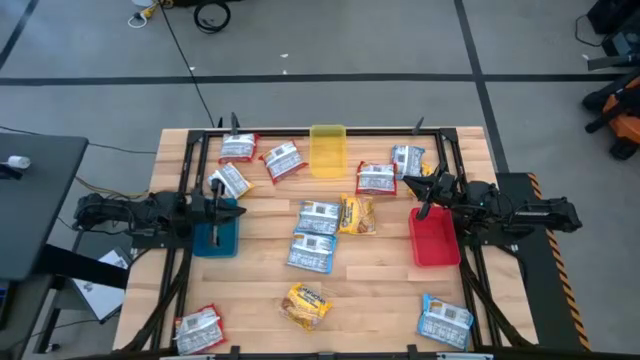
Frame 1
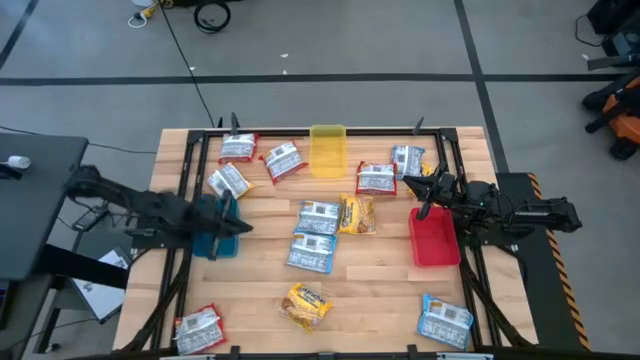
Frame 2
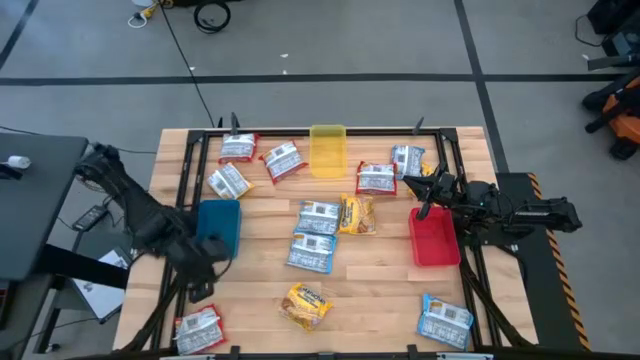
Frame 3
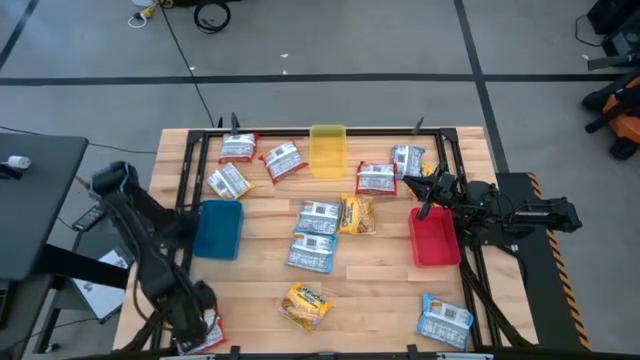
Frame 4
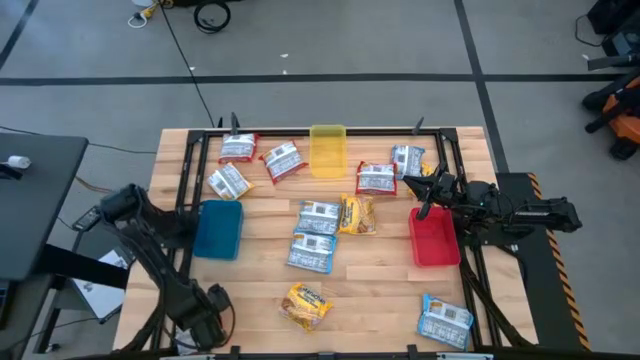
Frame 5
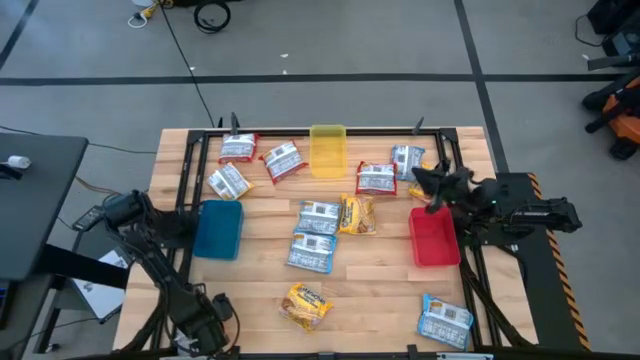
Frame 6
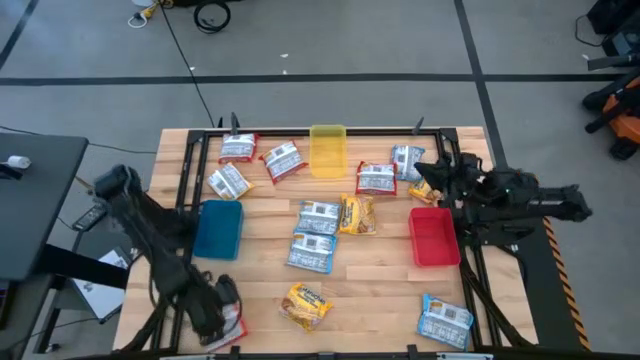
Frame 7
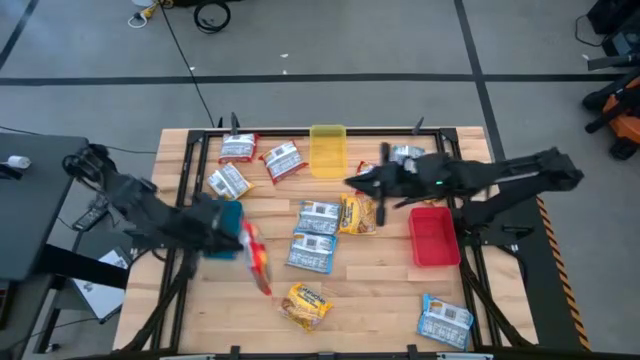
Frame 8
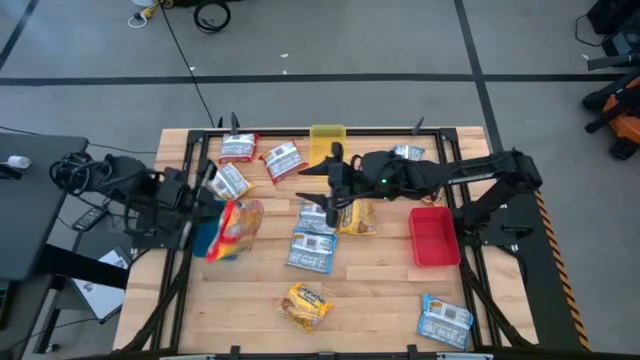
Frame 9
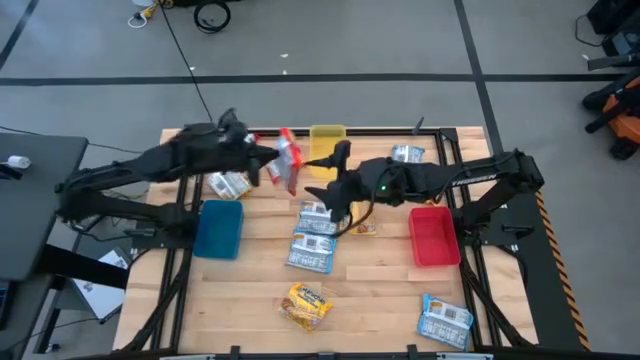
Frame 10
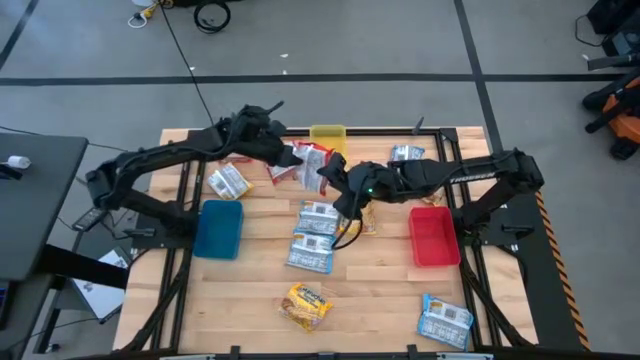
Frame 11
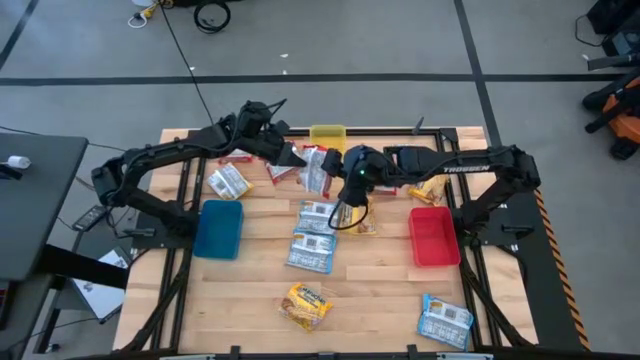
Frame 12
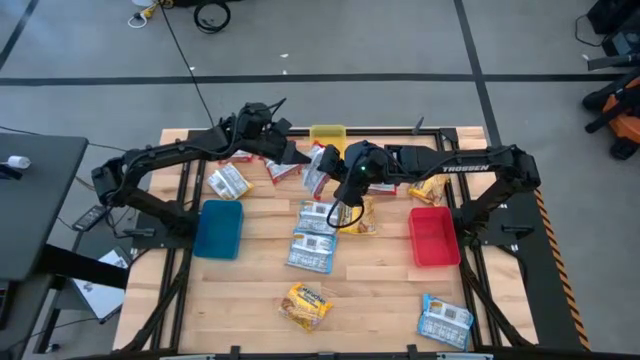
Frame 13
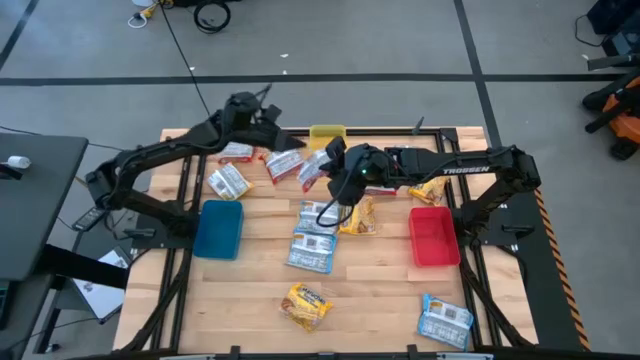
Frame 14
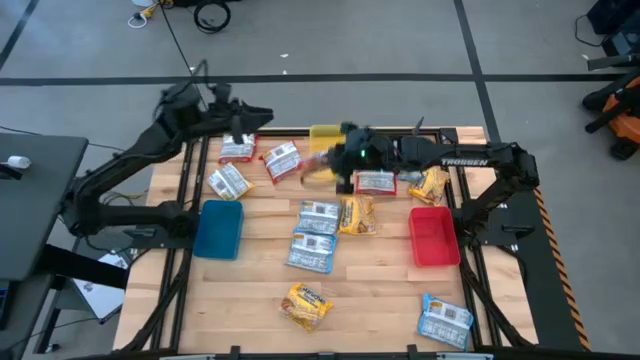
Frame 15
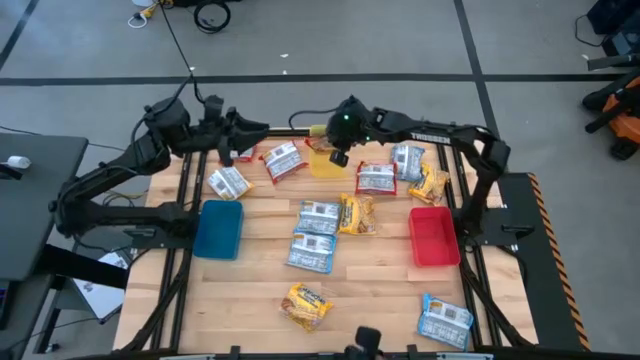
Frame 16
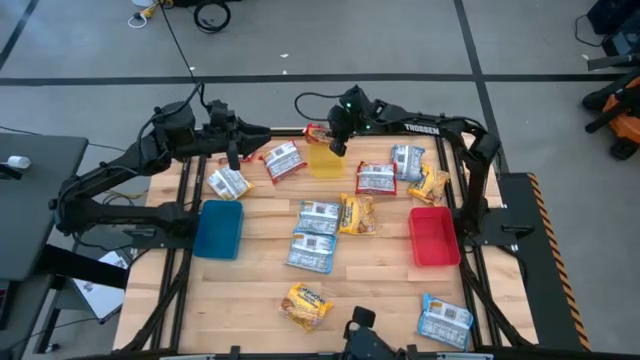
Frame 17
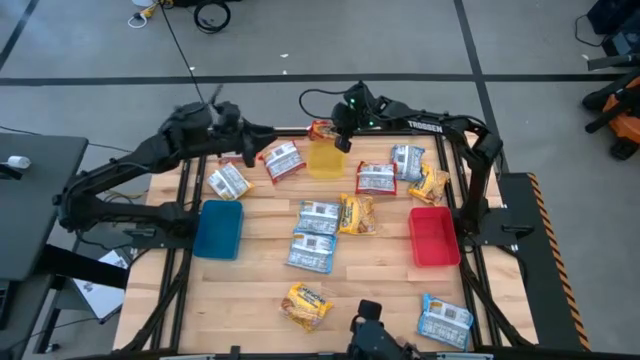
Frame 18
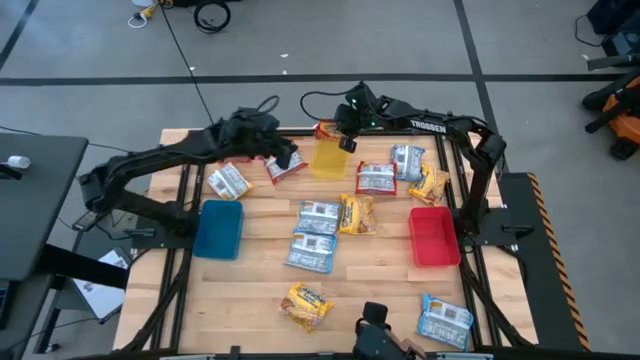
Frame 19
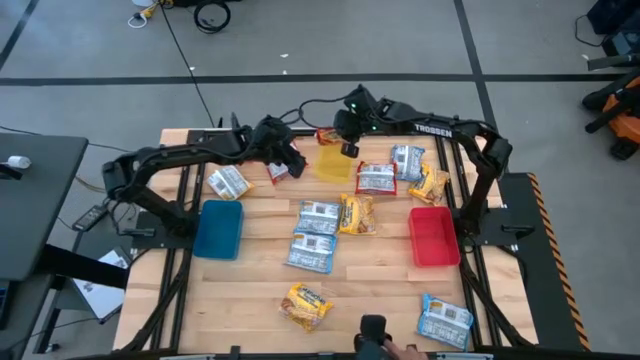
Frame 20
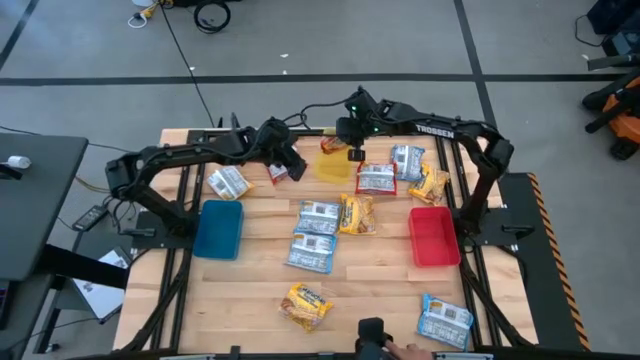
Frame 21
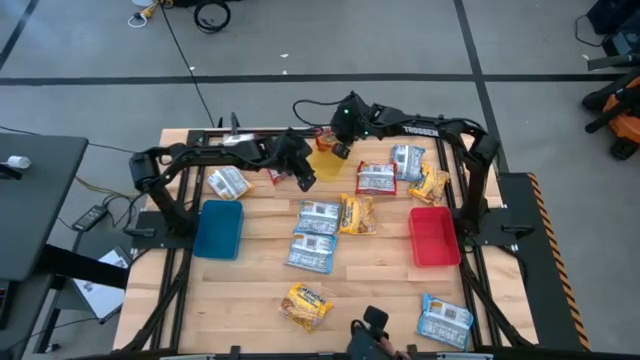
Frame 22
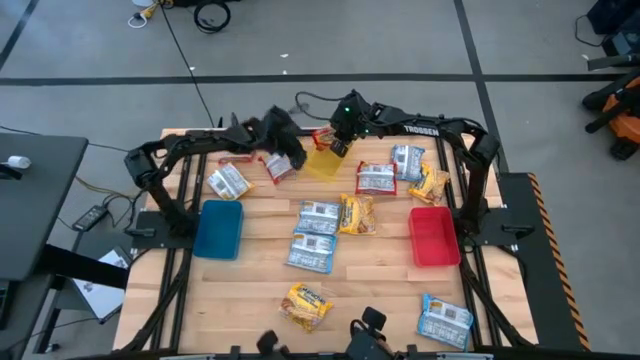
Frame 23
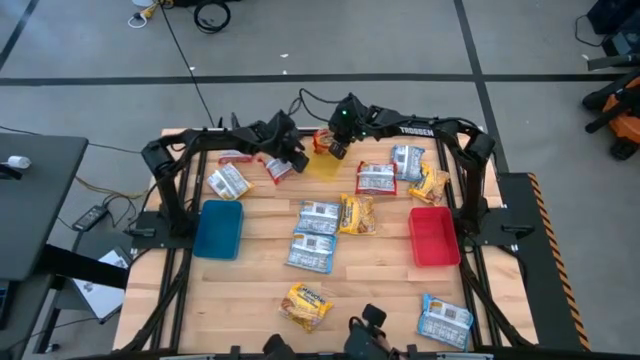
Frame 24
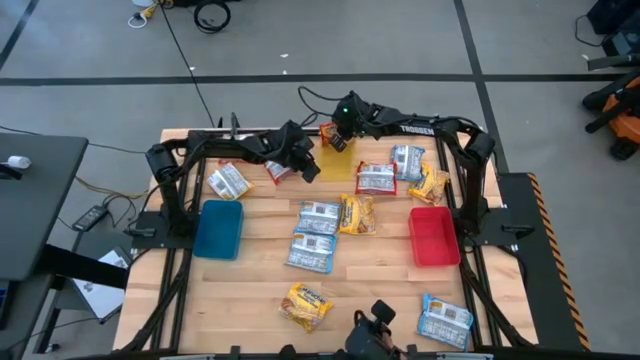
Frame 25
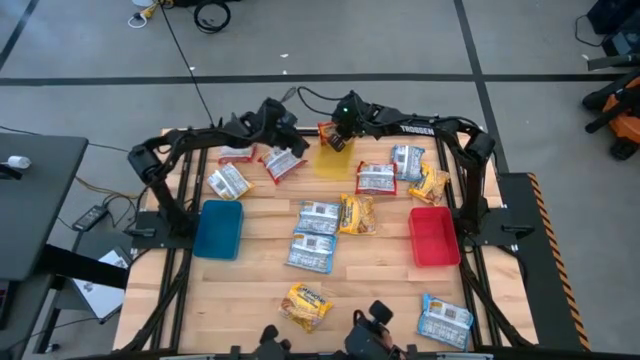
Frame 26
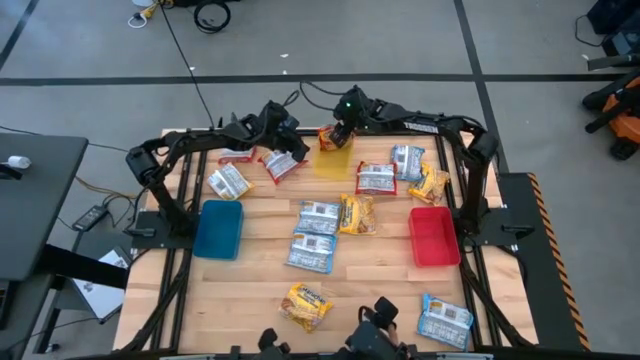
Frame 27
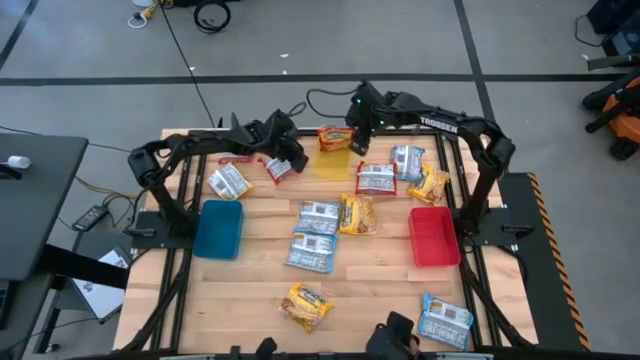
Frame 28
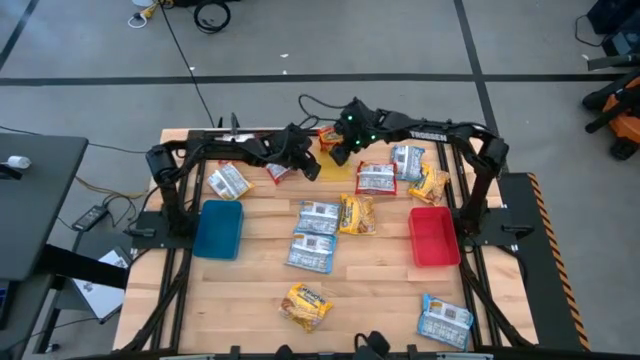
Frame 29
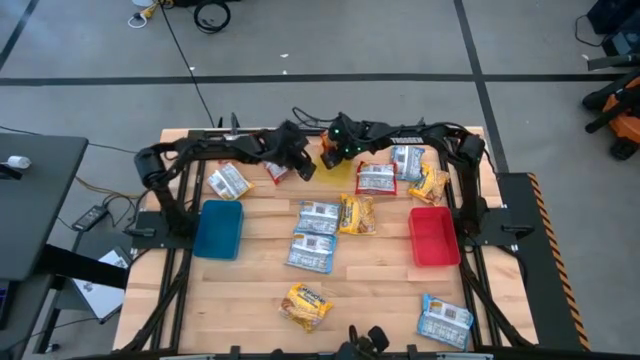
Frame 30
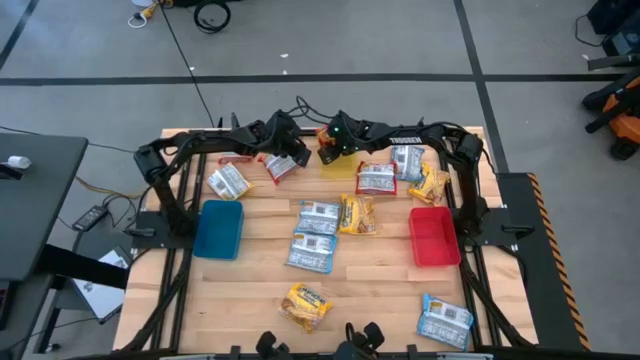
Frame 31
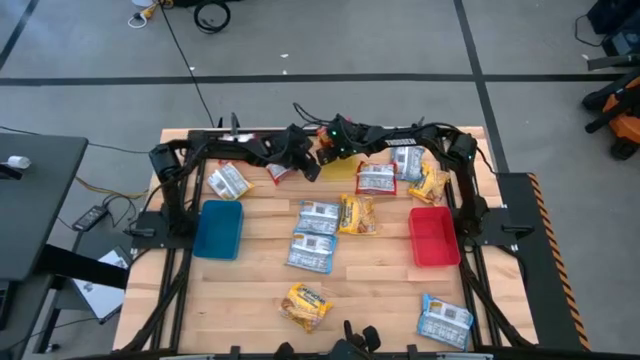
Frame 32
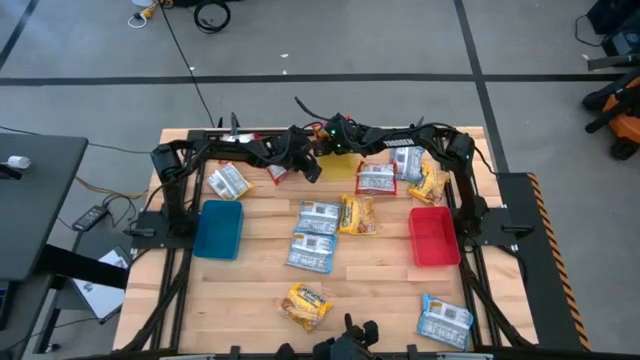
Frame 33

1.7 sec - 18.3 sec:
Task: Sort Maruchan noodles
Put the bottom left red noodle pack into the yellow bin

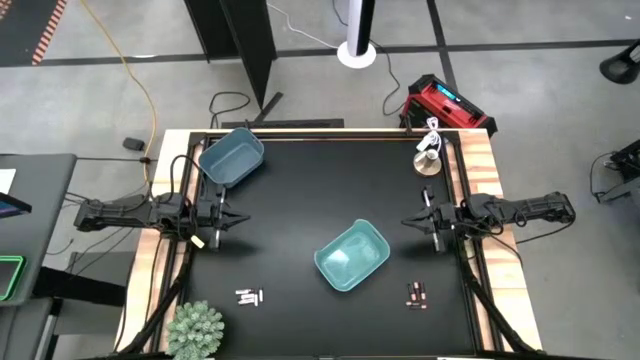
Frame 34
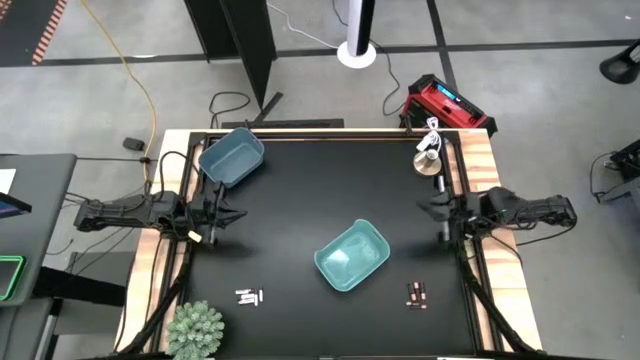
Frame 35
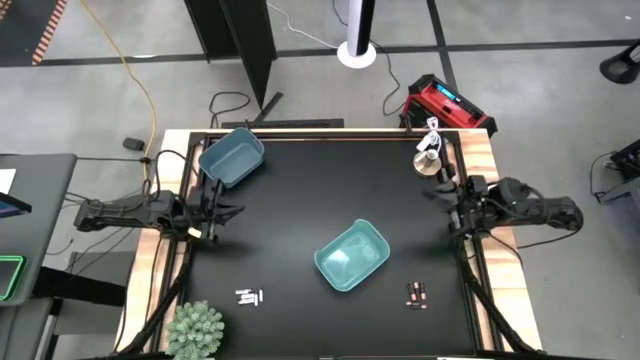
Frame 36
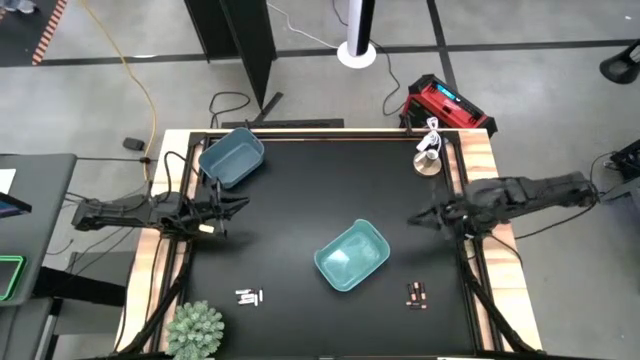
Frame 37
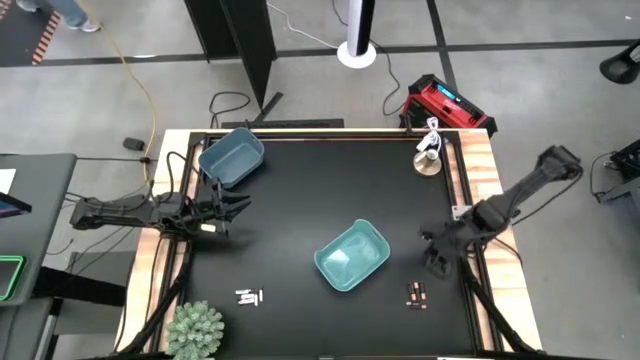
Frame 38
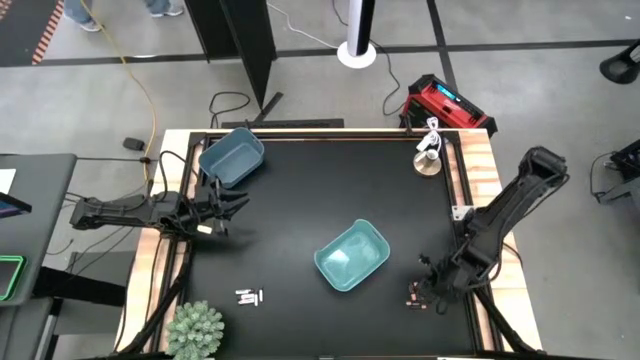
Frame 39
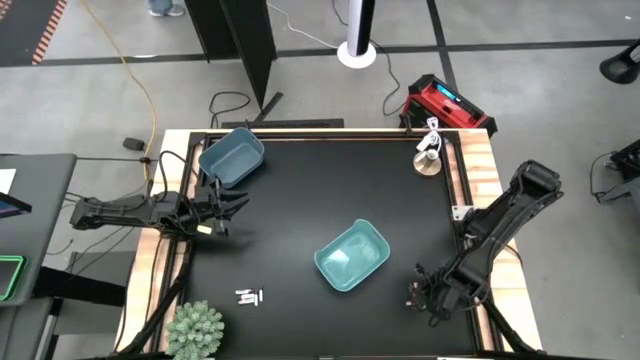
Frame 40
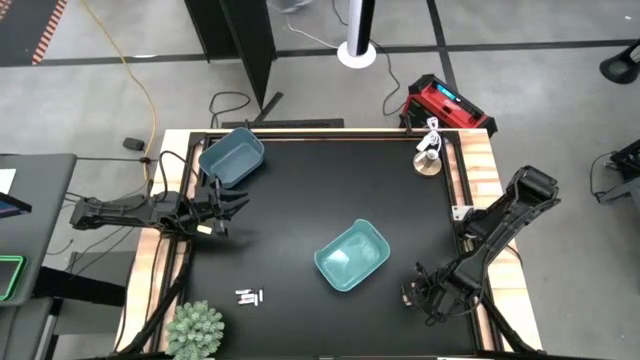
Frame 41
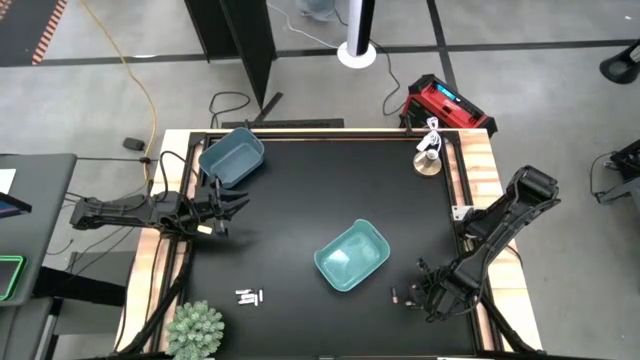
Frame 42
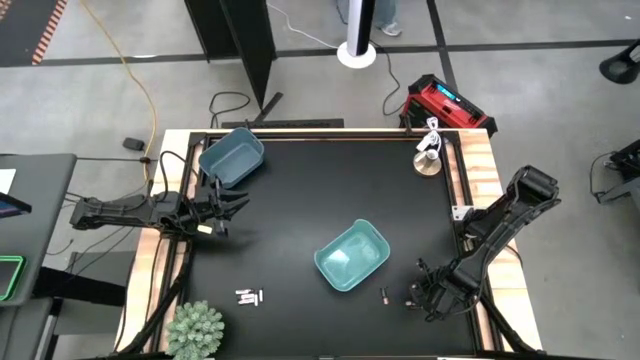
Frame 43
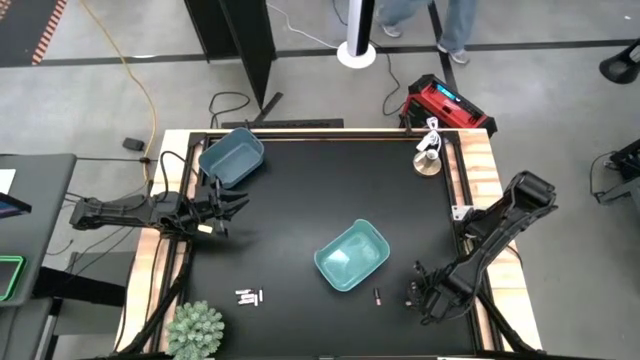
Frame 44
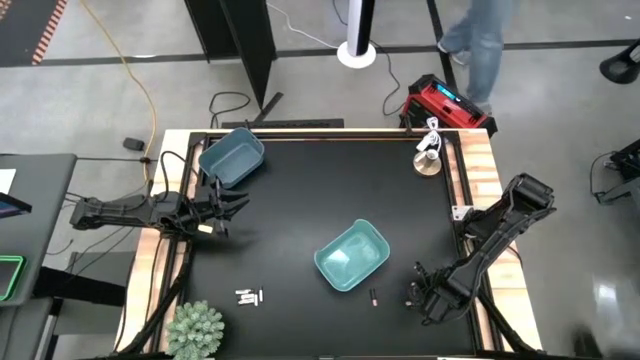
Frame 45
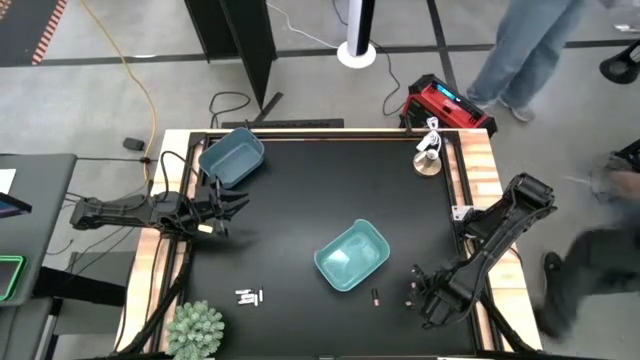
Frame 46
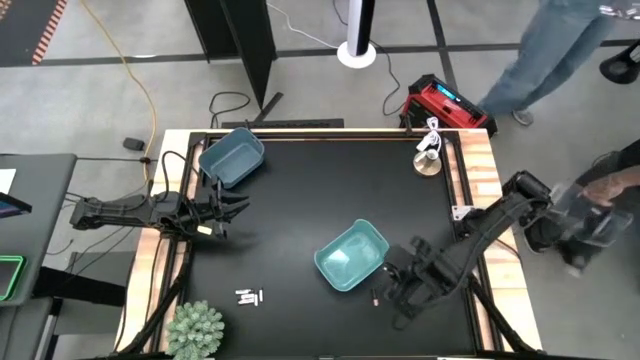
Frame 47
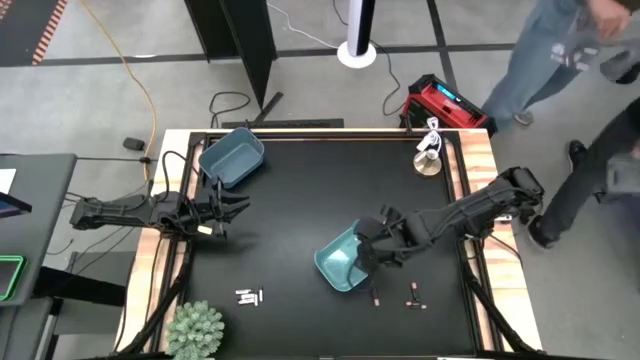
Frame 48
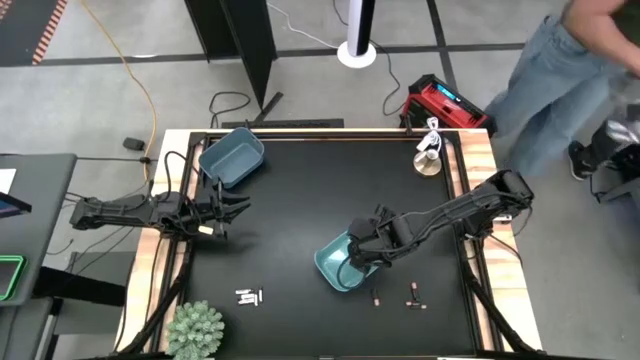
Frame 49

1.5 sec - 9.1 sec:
Task: Sort batteries
Put the black-brown battery into the light blue bin
